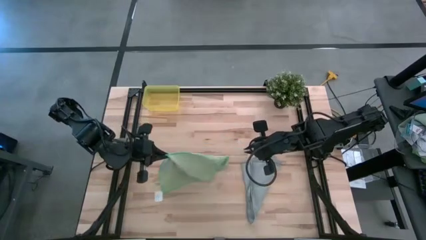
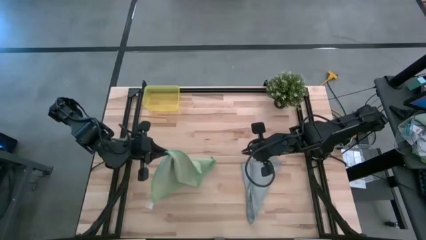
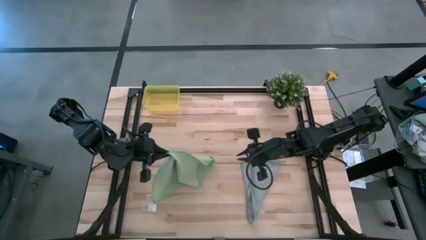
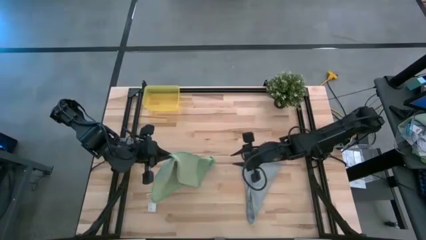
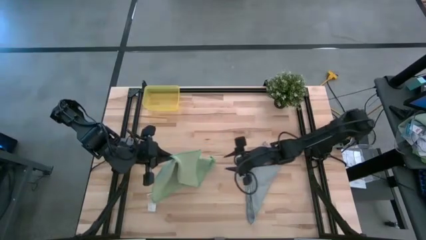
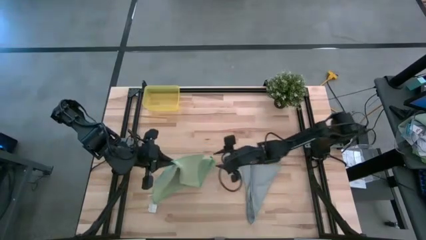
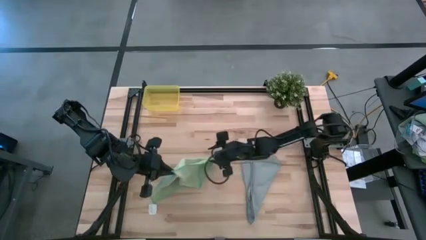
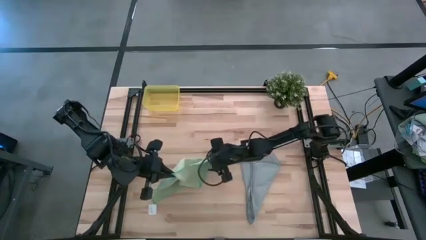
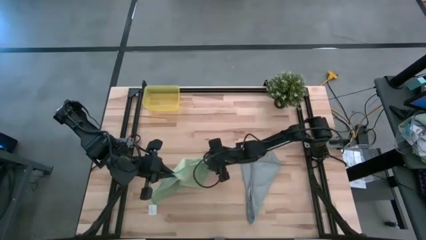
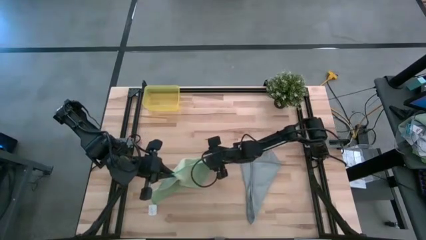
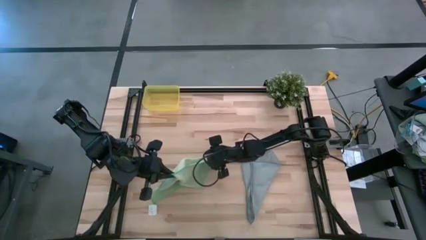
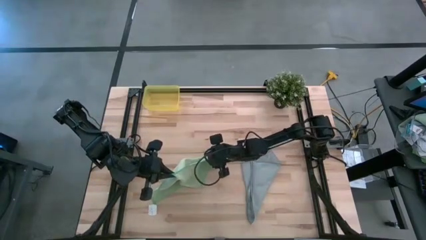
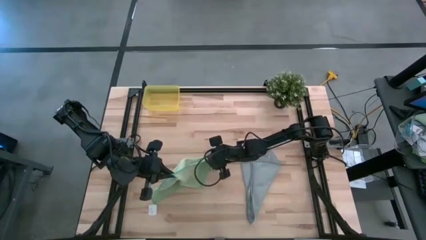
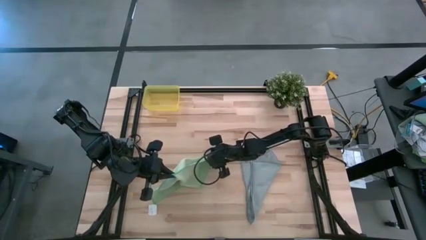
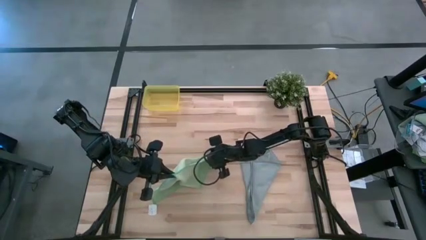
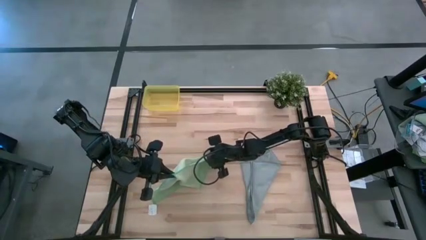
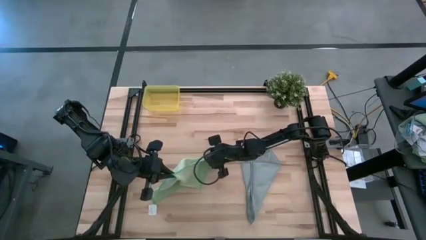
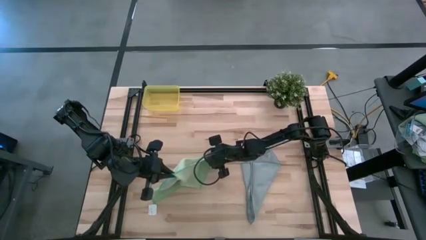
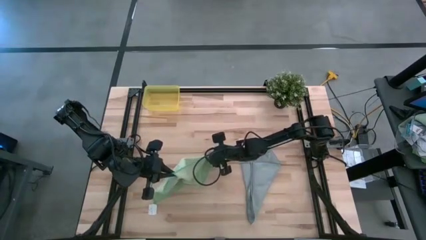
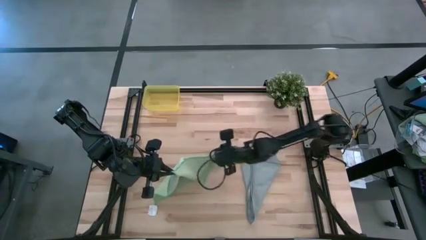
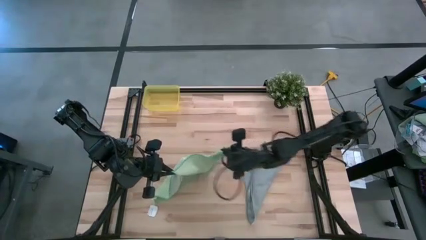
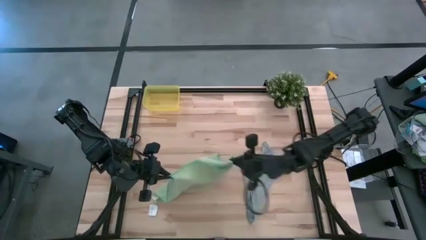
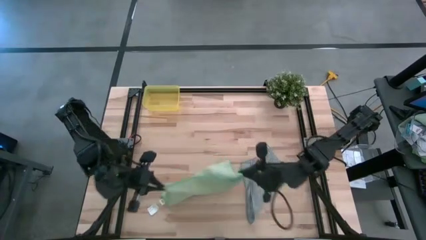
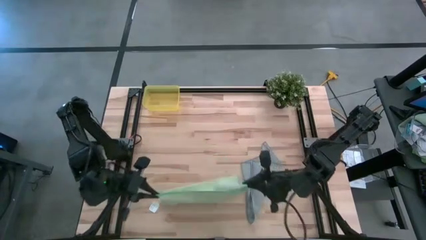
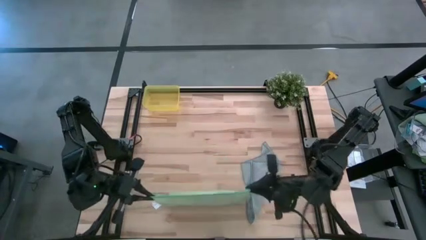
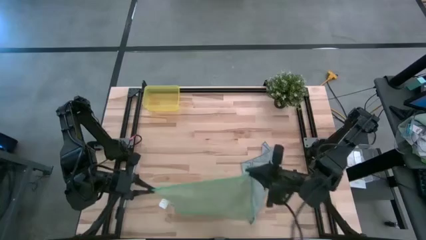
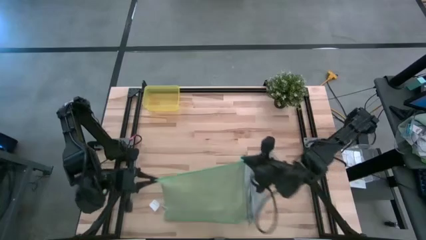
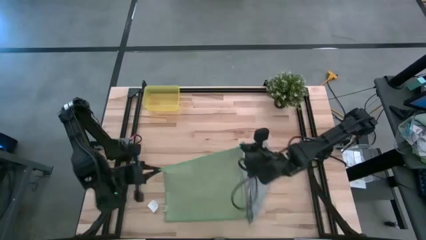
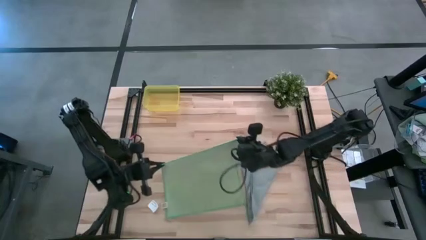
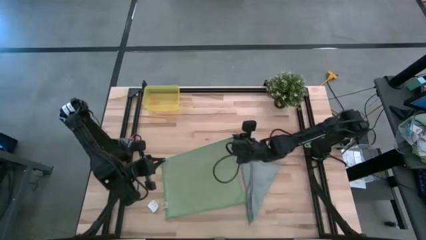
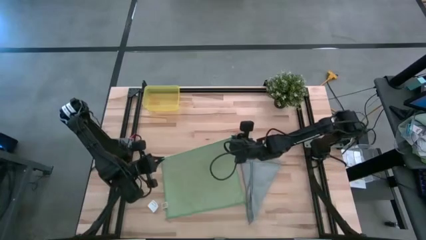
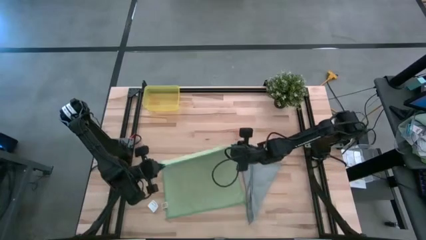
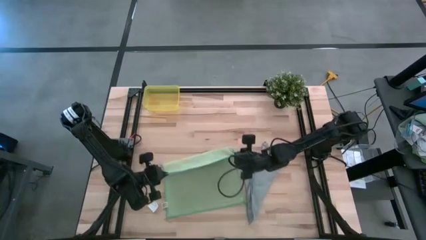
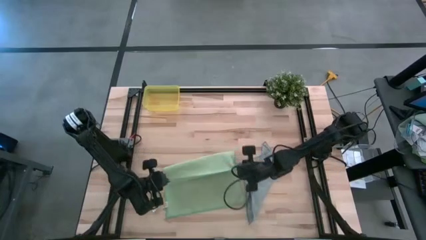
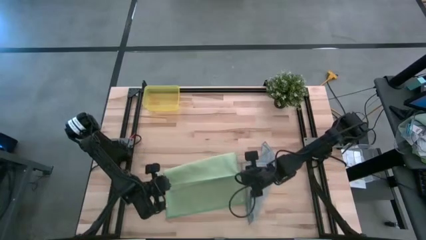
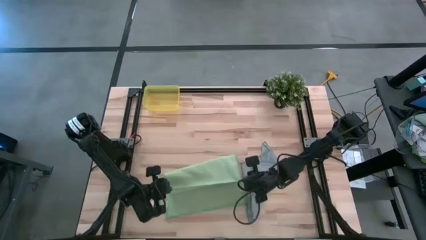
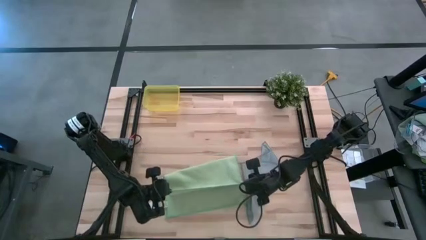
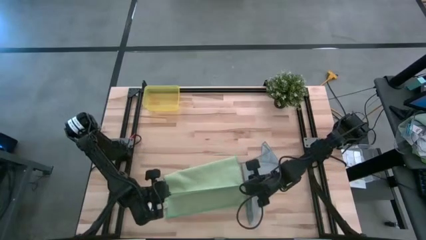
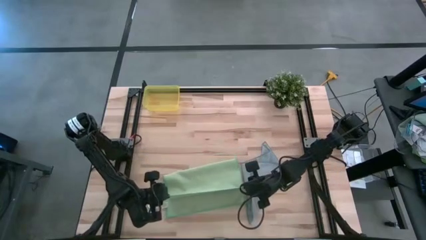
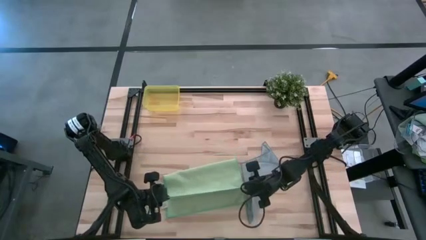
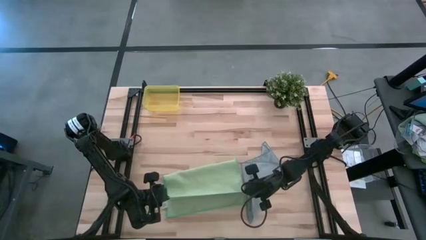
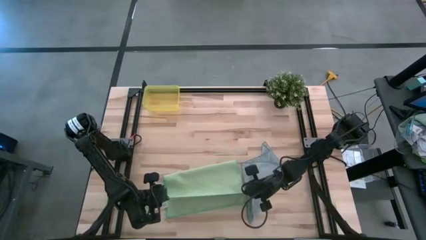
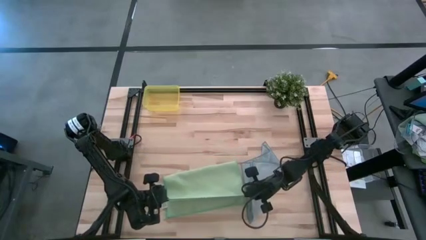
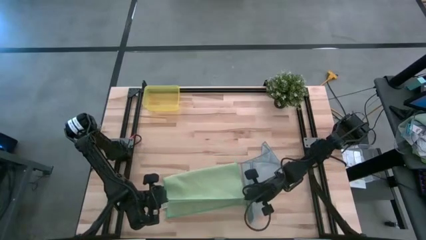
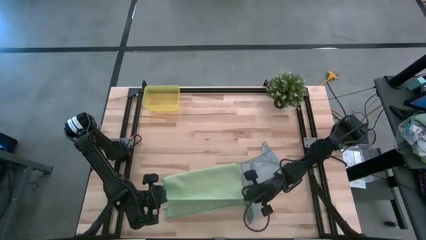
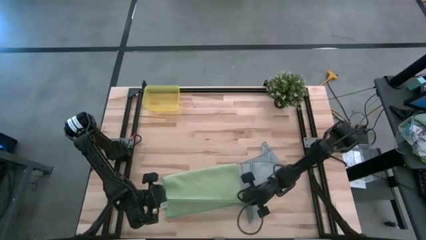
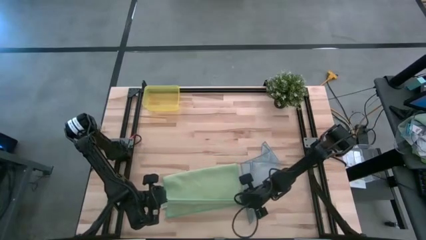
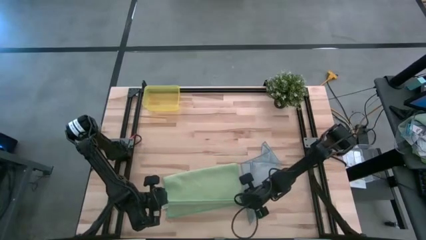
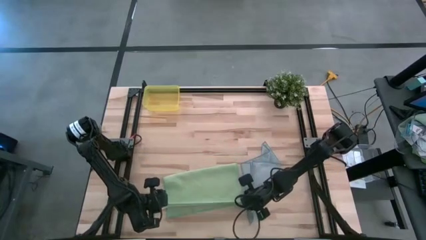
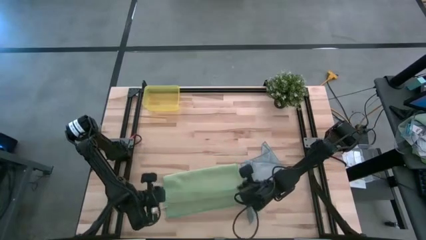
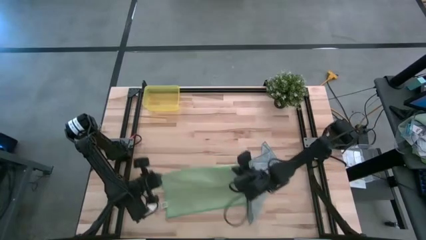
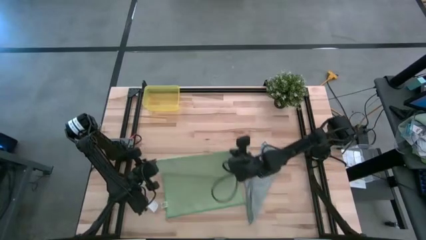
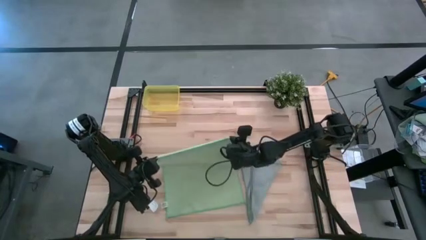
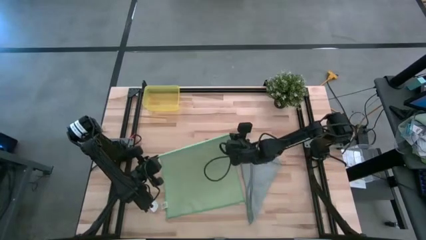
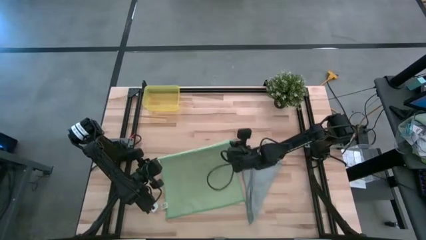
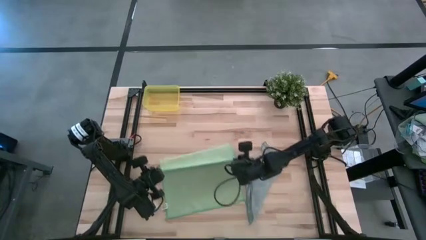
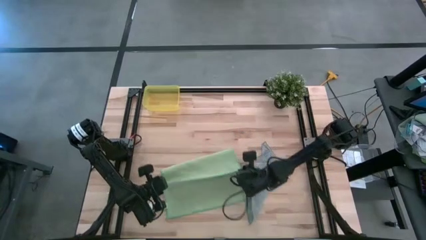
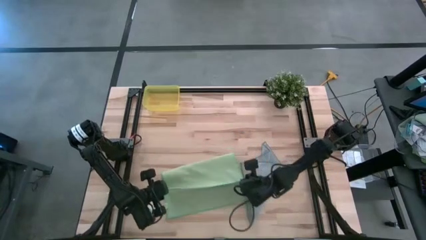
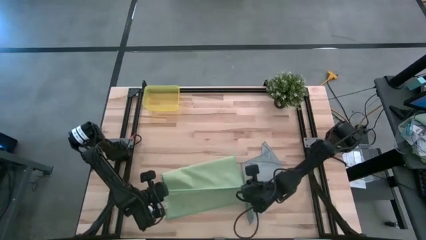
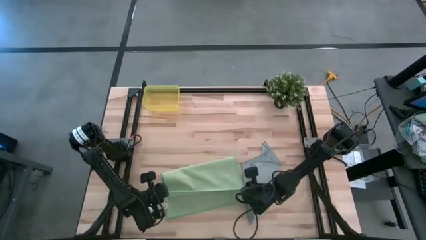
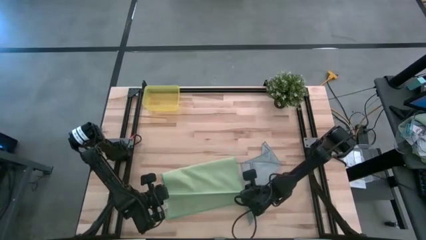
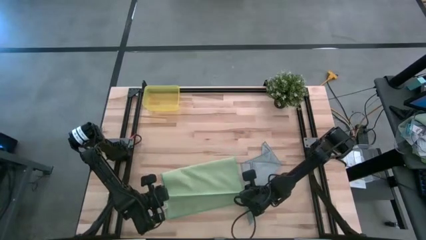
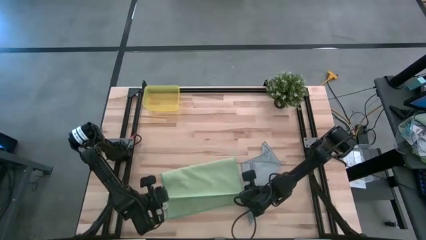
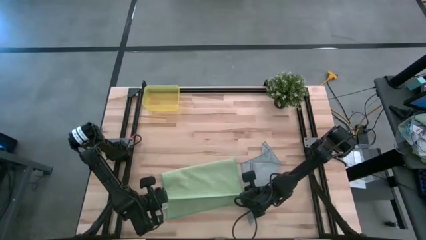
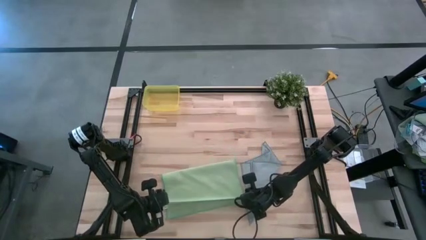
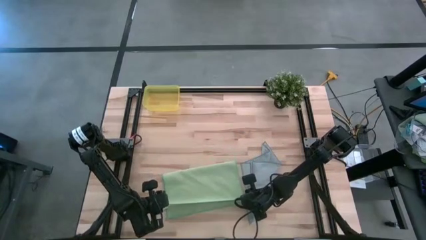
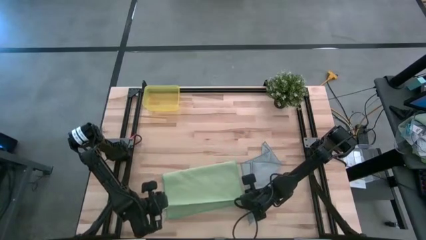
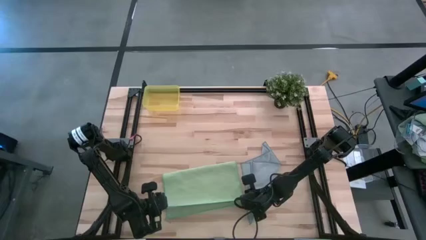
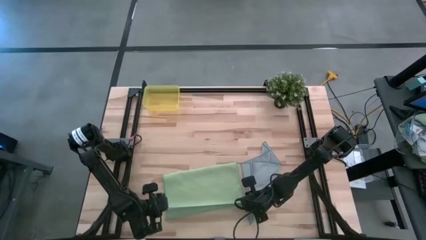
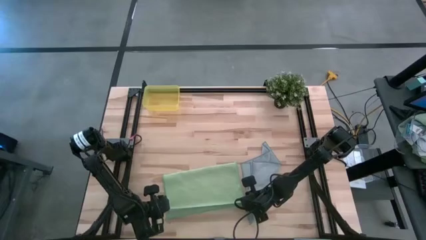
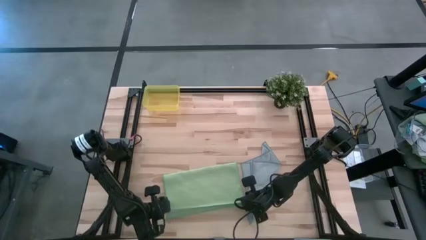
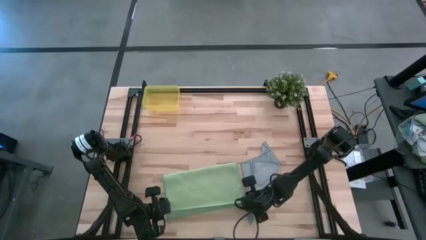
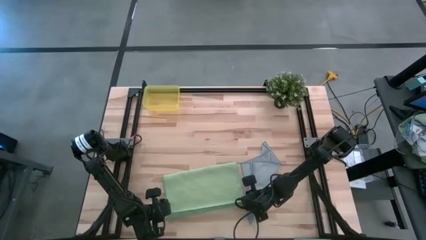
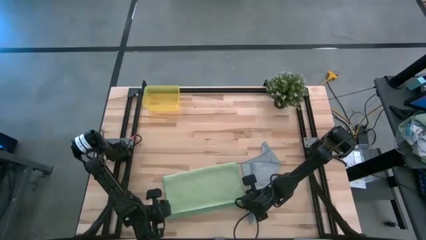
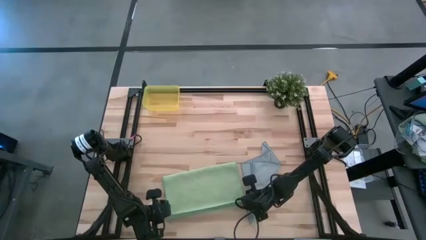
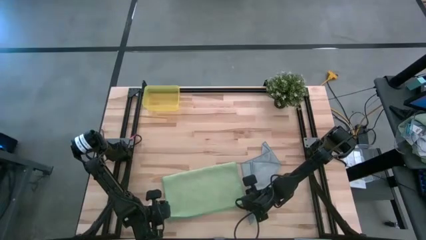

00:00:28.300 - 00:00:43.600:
Task: Roll microfiber towels into tight, uniform cylinder then place into a basket
Fold the green towel
